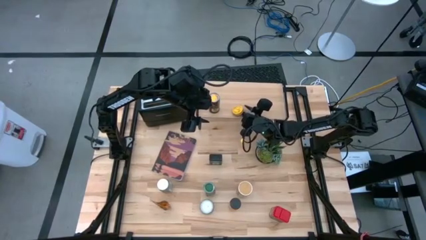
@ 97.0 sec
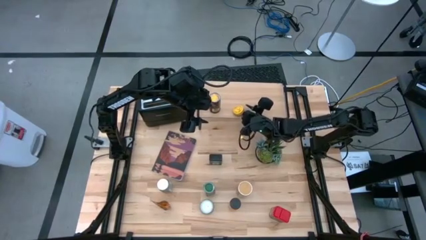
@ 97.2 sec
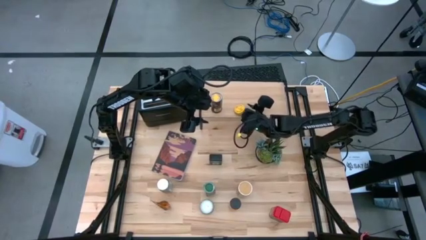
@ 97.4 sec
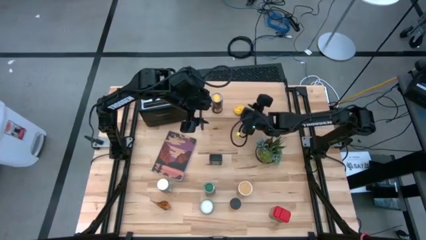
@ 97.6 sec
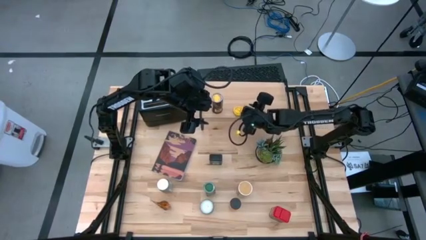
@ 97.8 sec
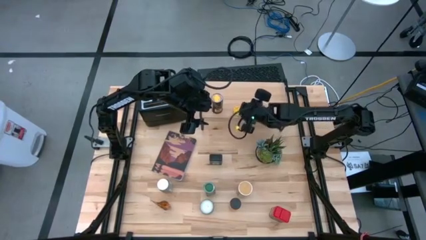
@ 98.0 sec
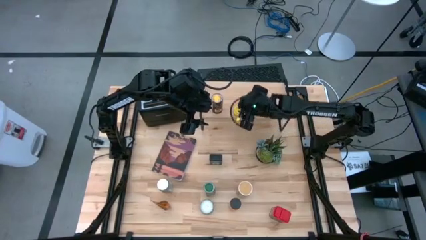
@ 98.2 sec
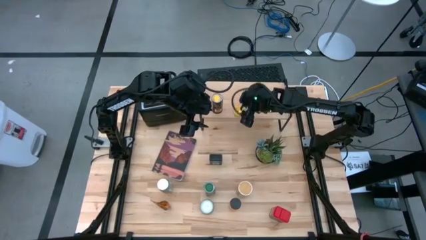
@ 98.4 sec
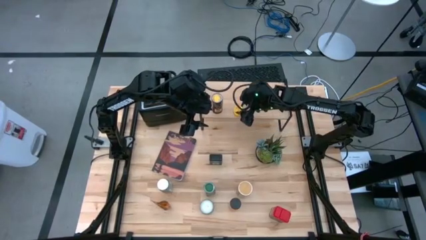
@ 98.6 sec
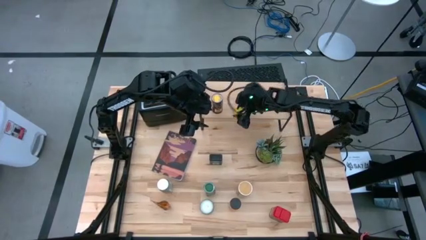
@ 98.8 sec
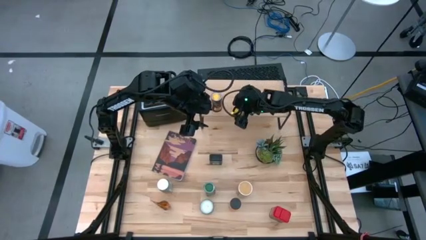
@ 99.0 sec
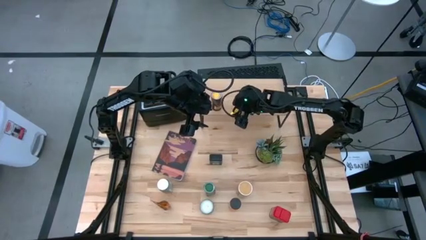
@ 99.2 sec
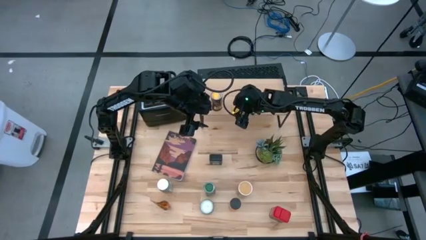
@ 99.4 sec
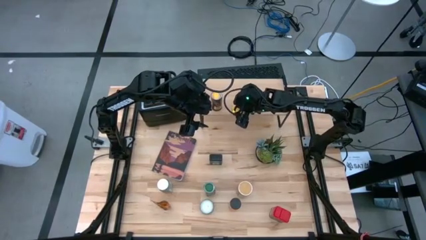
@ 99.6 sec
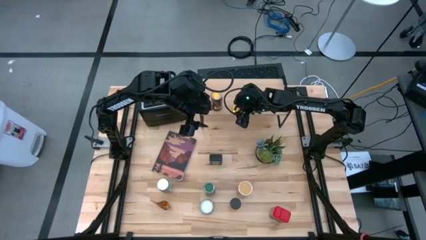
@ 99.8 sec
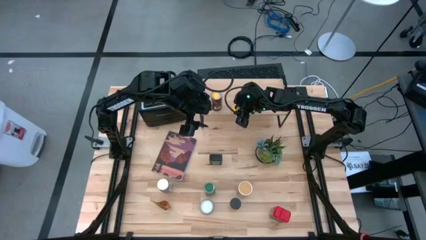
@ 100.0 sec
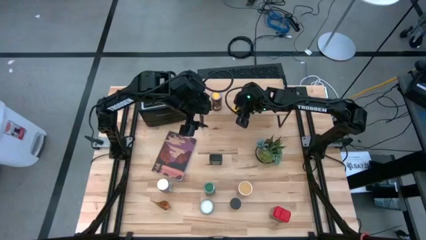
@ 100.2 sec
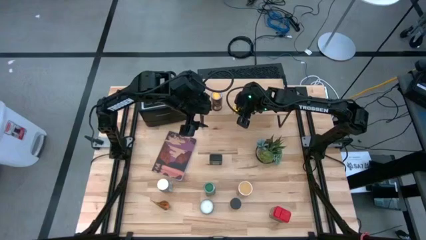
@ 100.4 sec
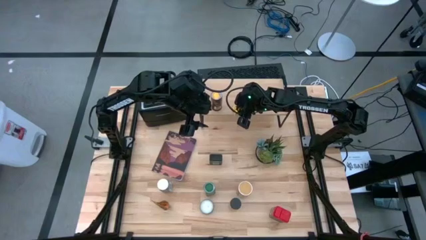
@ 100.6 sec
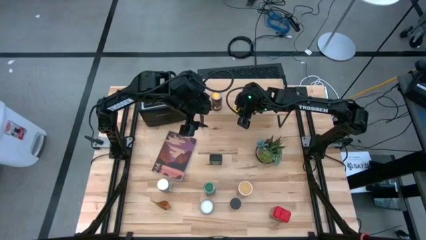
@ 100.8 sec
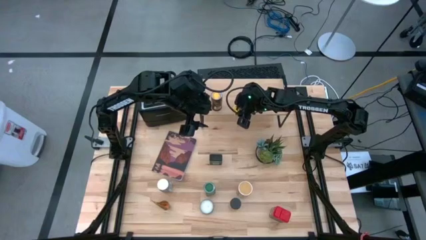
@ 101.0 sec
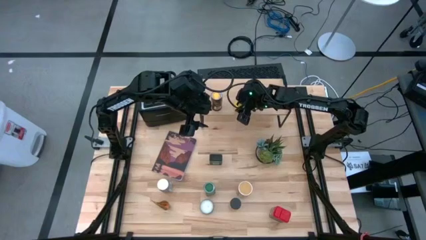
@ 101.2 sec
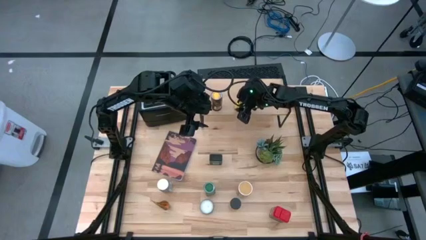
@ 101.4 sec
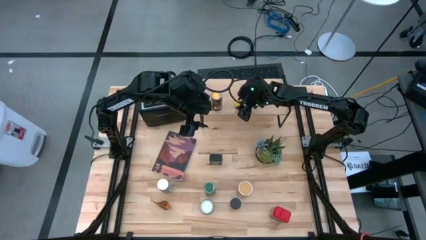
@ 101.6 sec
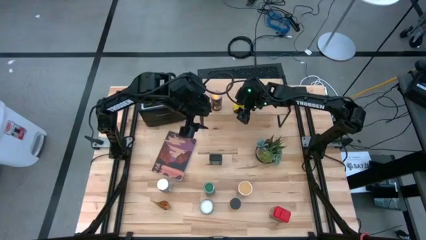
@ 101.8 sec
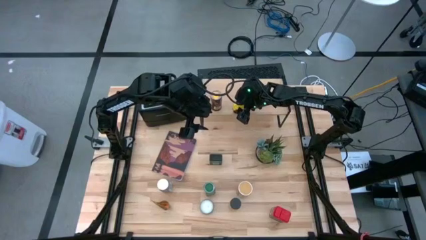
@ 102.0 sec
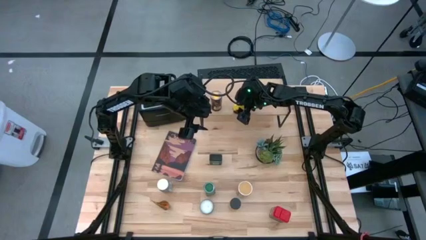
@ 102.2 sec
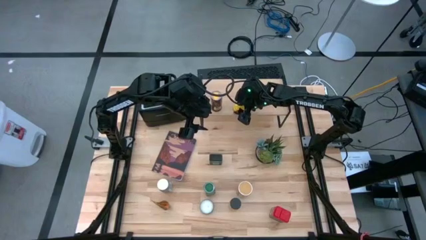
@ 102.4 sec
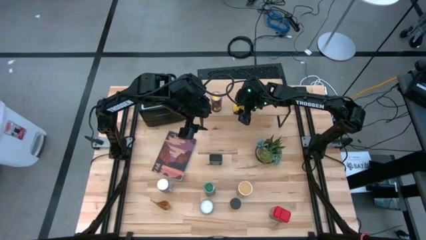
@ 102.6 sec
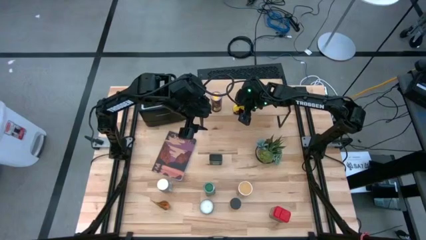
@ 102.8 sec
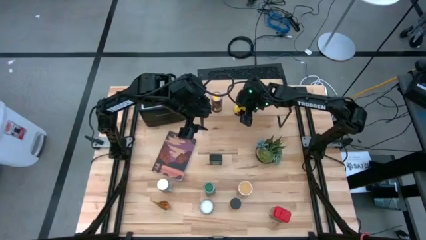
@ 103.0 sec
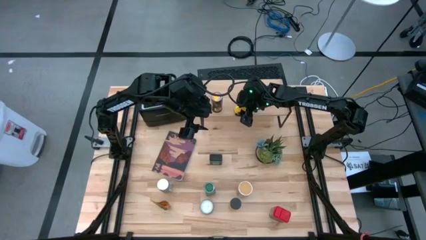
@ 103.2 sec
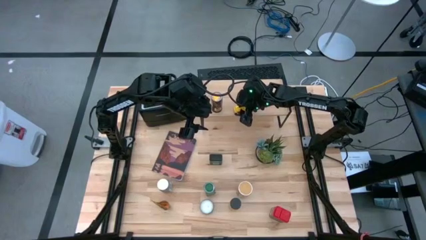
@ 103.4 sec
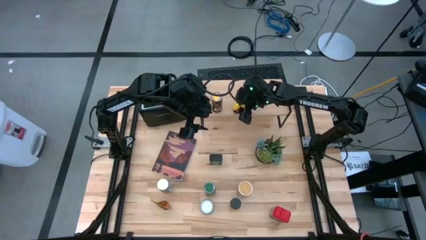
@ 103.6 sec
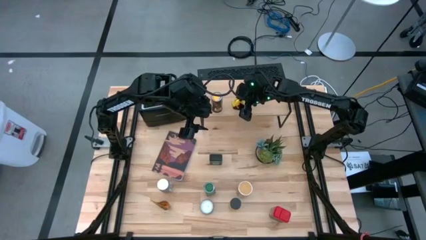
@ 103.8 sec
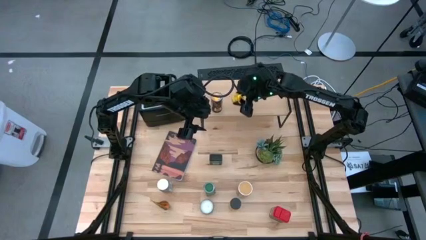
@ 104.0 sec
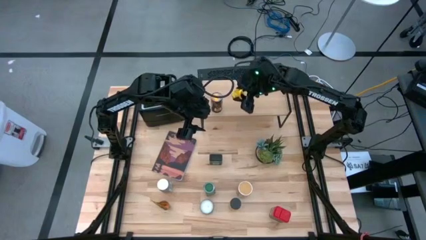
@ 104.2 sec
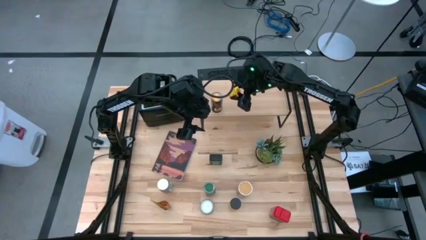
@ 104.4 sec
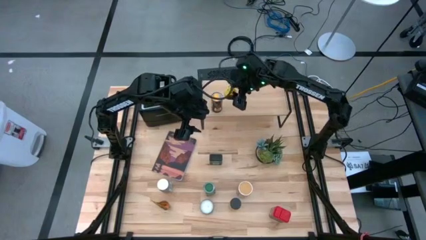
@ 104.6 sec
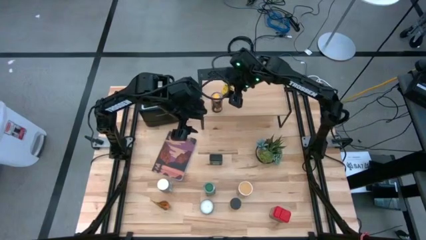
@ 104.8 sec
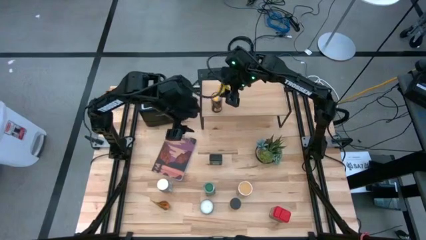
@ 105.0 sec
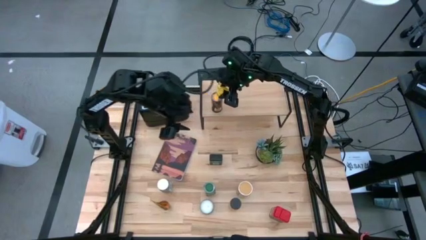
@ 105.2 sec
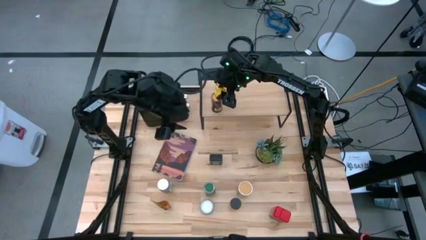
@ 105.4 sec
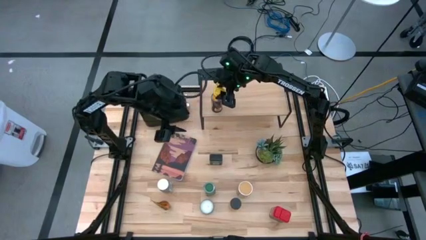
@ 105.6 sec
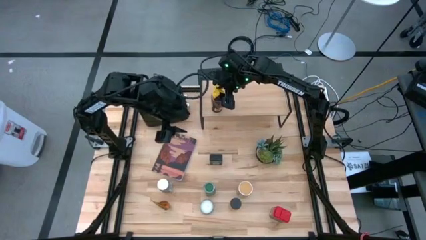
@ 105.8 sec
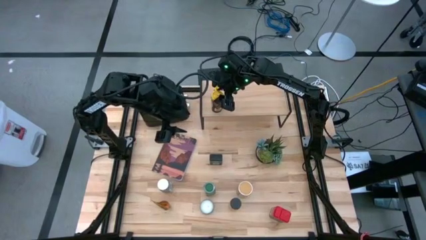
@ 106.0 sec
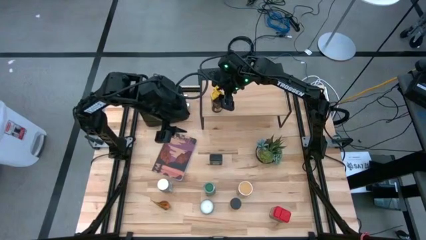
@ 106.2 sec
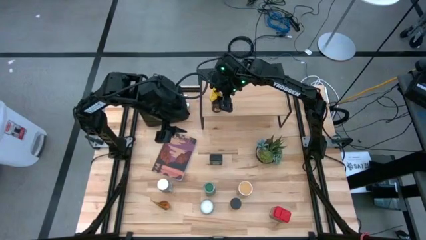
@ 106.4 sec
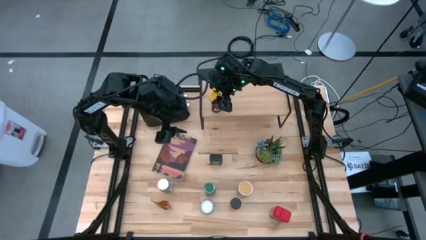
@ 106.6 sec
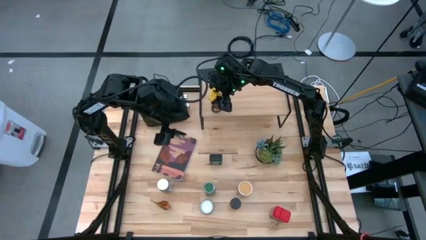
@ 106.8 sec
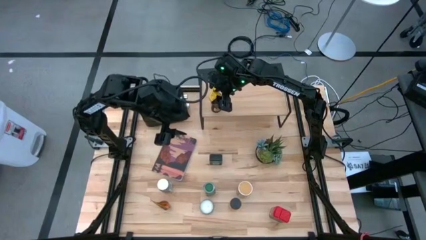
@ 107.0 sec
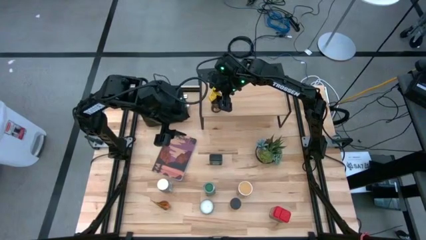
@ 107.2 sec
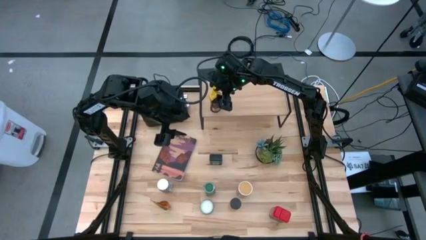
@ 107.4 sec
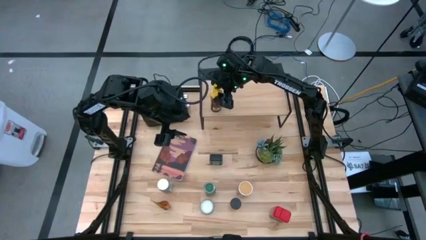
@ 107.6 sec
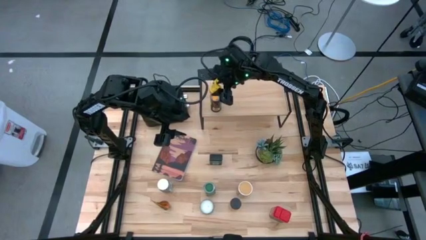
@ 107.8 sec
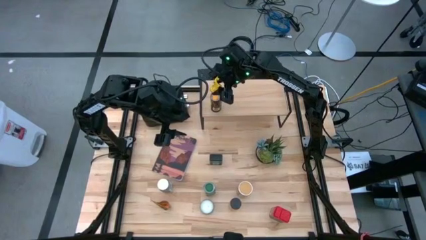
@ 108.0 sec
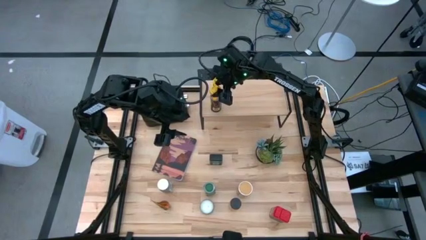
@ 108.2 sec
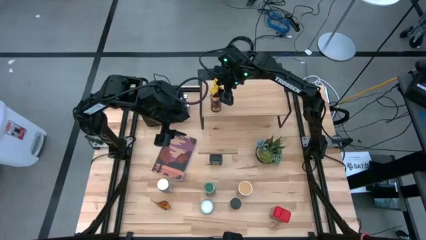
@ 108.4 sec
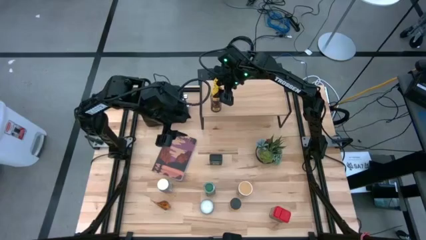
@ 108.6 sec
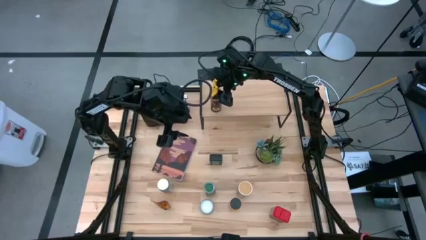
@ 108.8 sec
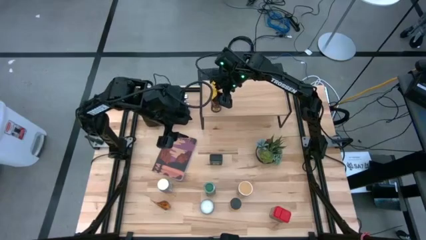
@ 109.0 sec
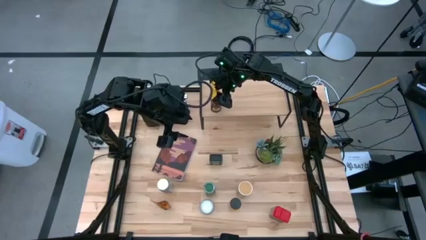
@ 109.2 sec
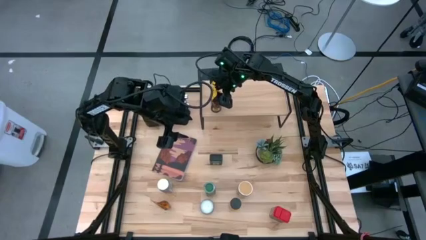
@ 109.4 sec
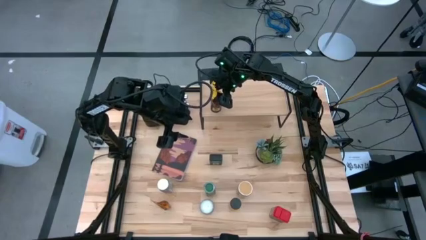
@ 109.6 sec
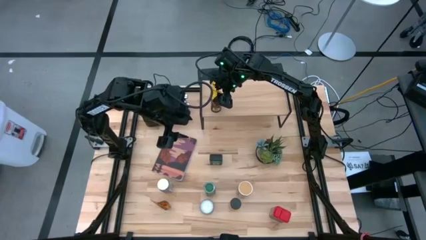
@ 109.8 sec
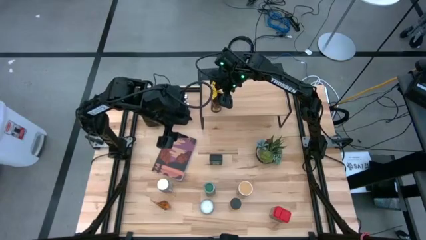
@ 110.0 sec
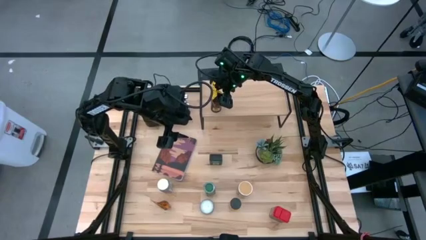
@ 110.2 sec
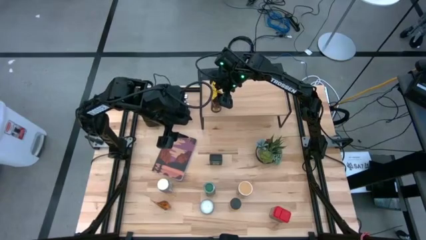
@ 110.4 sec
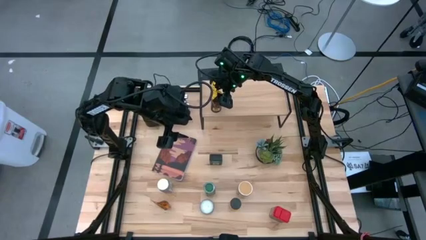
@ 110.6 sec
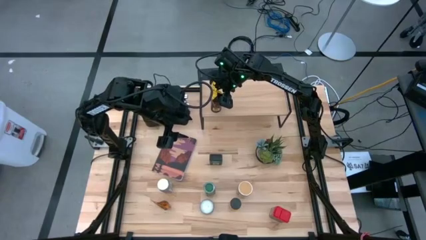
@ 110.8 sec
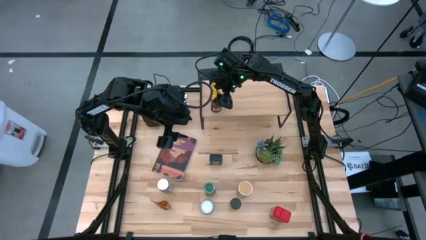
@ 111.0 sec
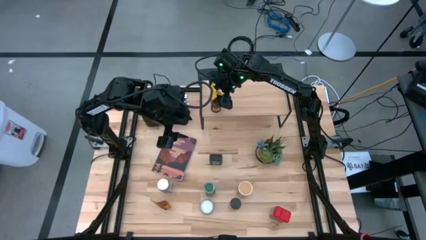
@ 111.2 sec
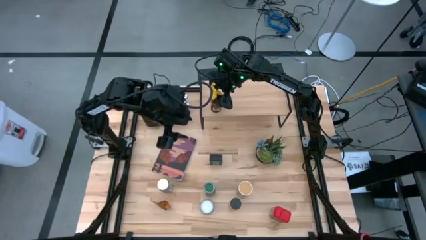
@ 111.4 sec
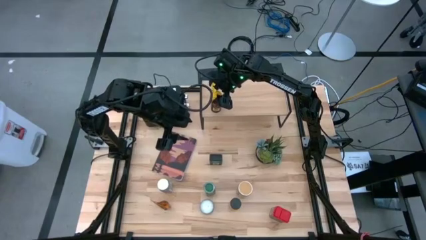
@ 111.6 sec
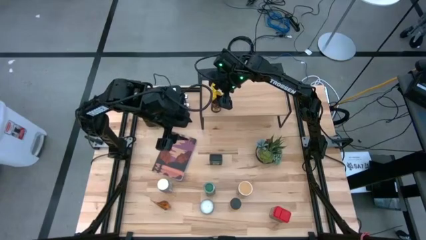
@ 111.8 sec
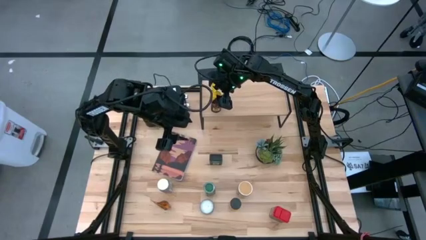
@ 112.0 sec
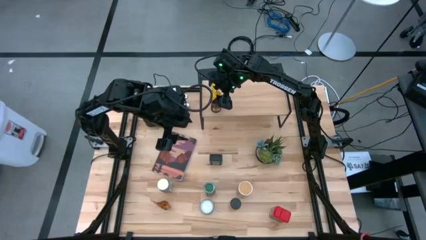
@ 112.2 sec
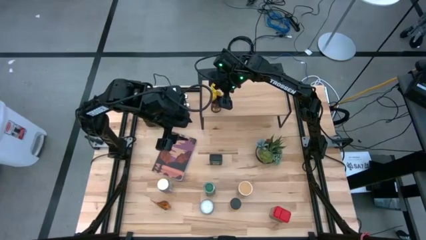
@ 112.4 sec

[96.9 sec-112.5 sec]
Task: Shelf spices
Put the yellow cap into the seasoning bottle
